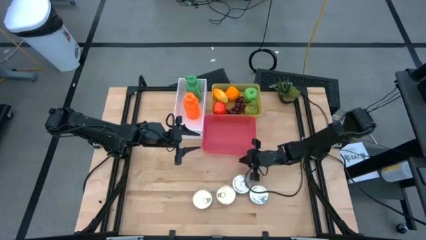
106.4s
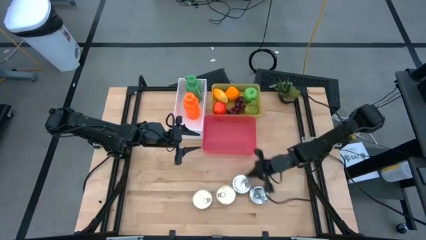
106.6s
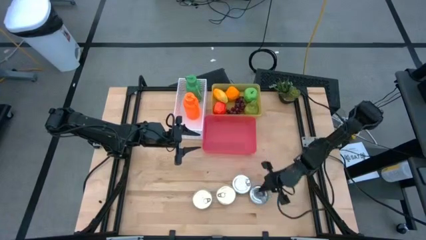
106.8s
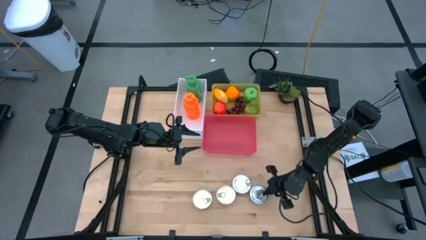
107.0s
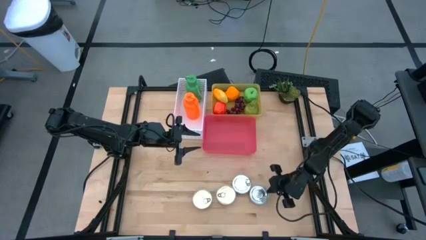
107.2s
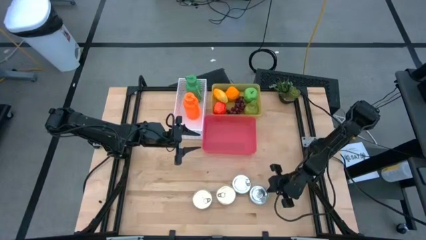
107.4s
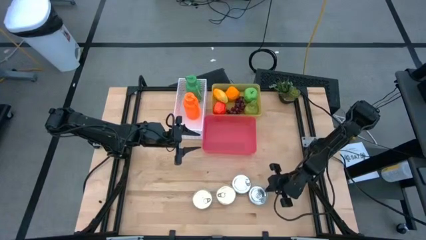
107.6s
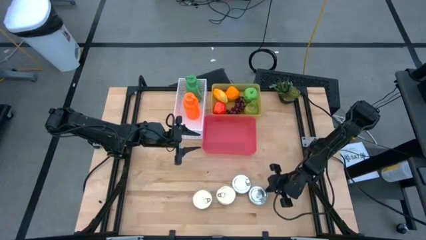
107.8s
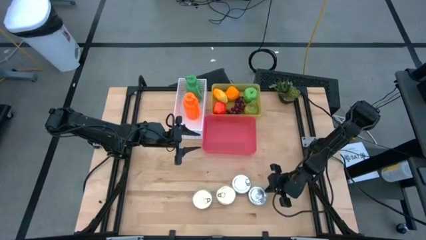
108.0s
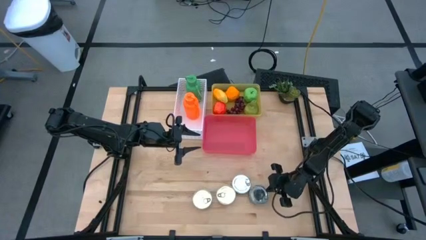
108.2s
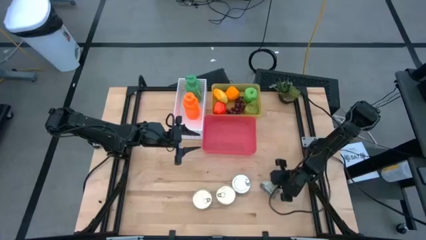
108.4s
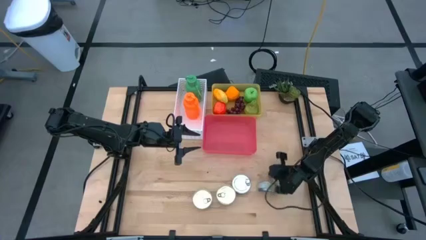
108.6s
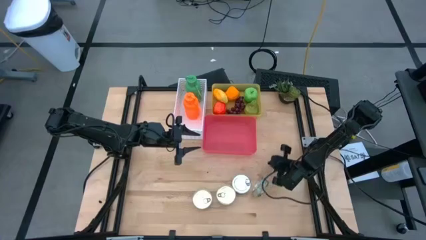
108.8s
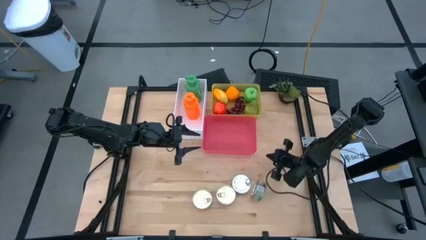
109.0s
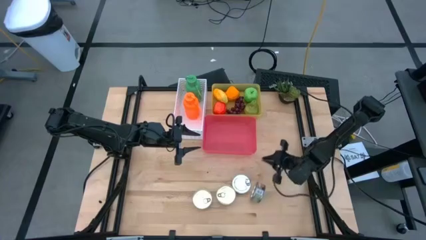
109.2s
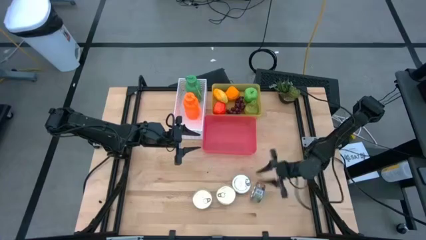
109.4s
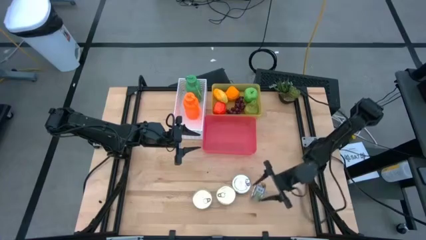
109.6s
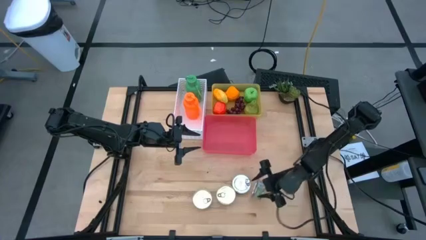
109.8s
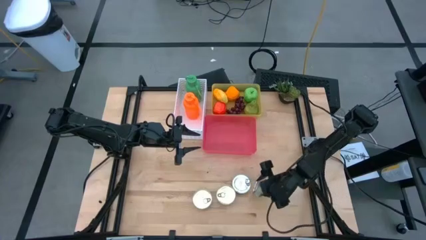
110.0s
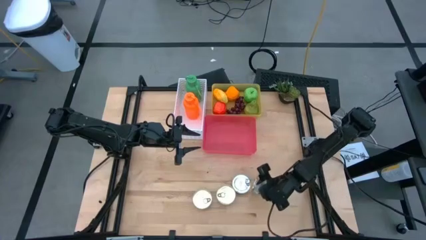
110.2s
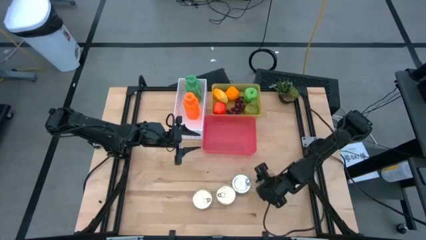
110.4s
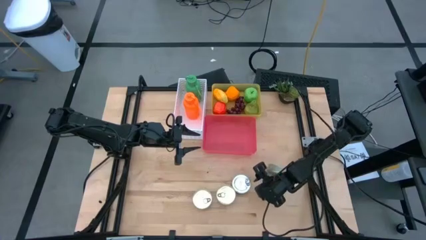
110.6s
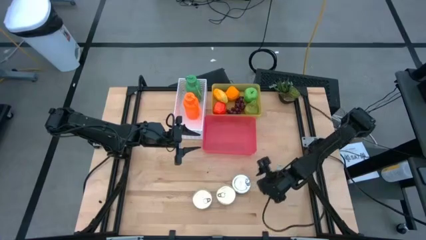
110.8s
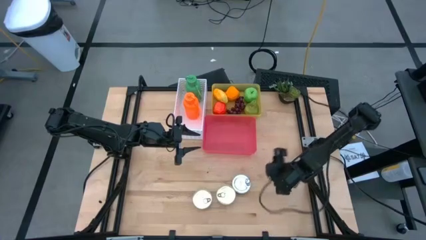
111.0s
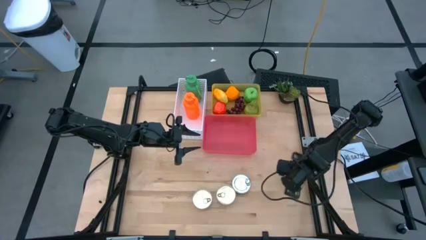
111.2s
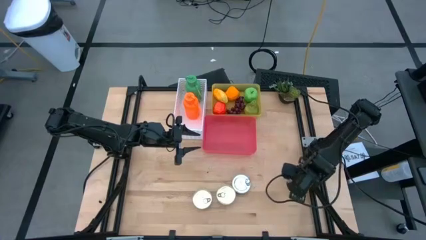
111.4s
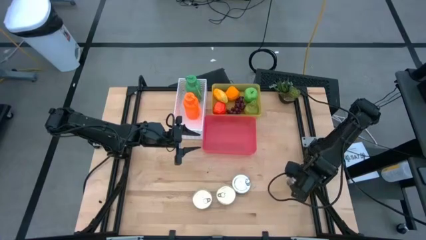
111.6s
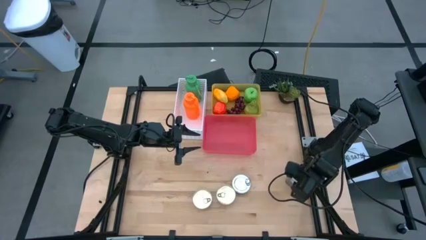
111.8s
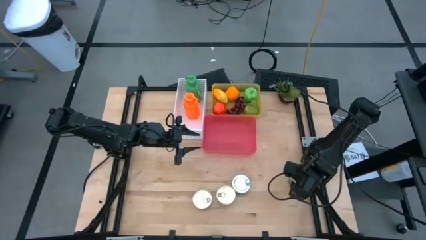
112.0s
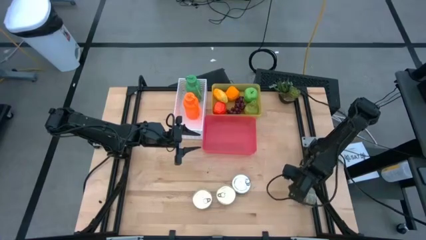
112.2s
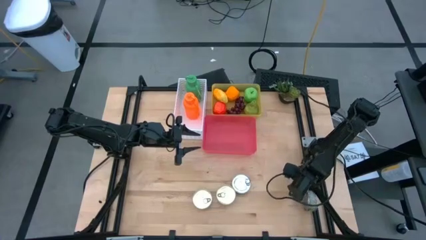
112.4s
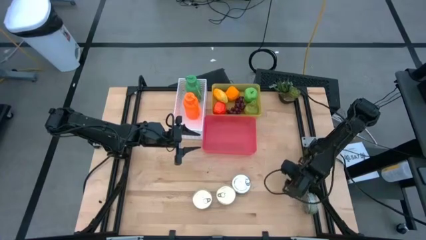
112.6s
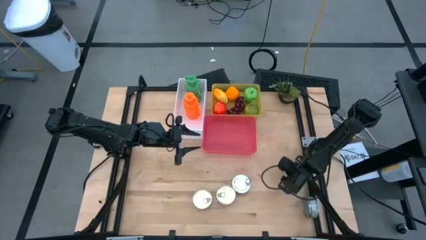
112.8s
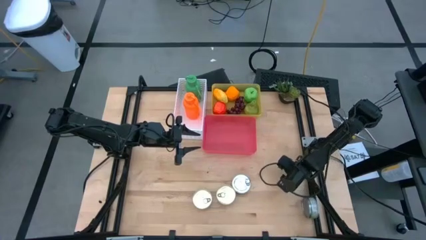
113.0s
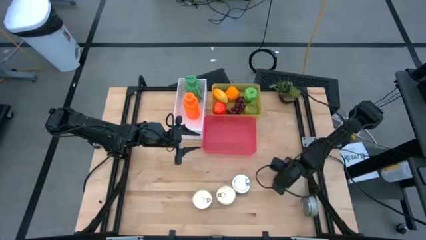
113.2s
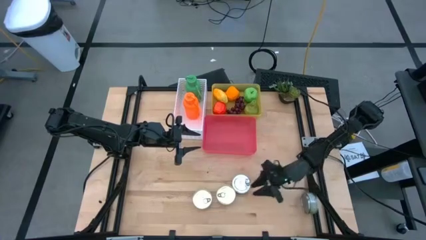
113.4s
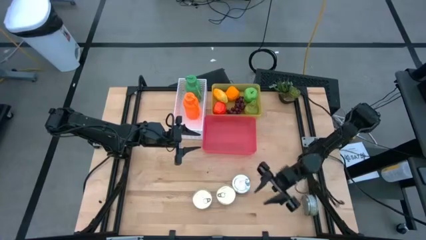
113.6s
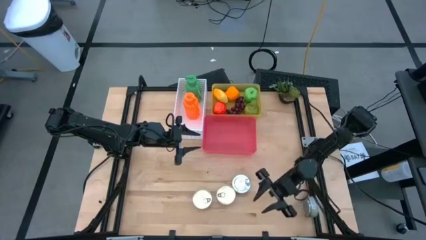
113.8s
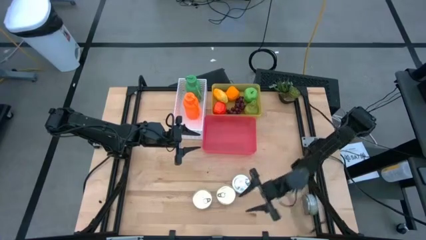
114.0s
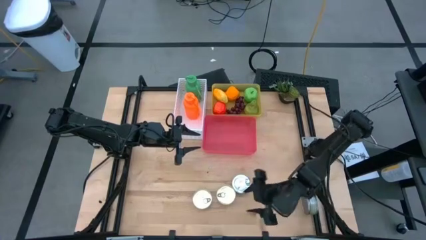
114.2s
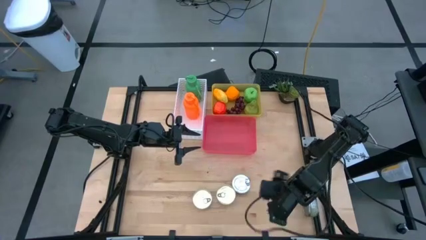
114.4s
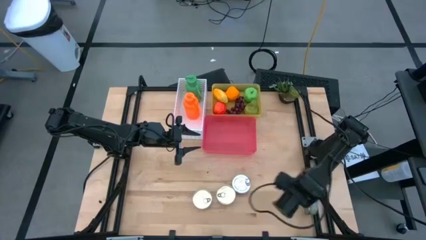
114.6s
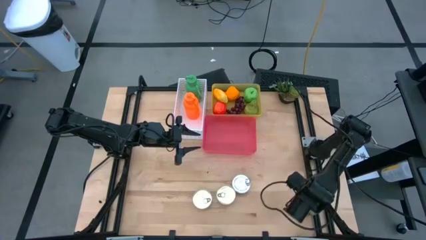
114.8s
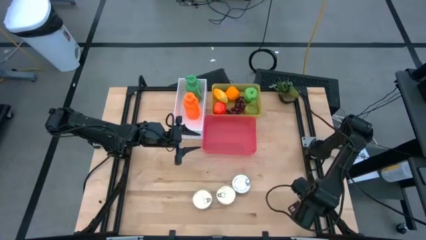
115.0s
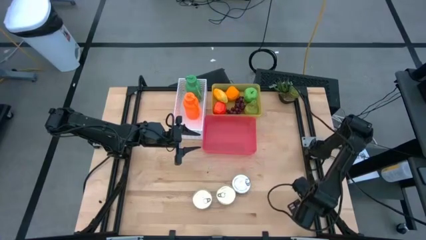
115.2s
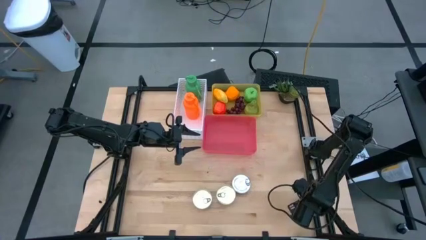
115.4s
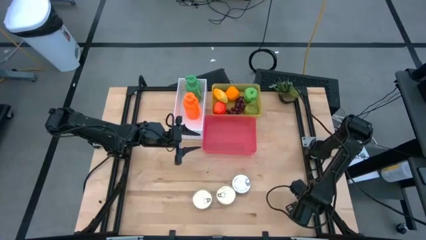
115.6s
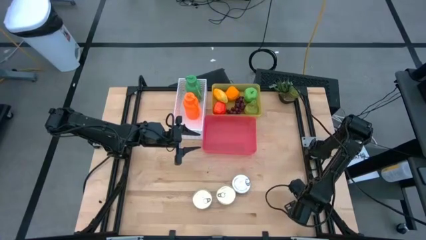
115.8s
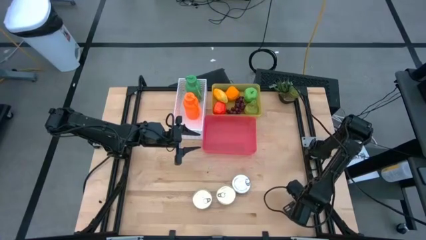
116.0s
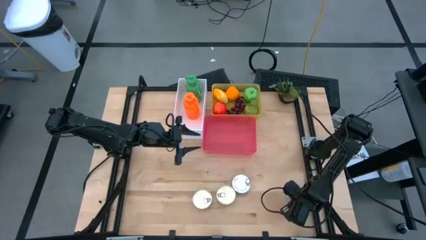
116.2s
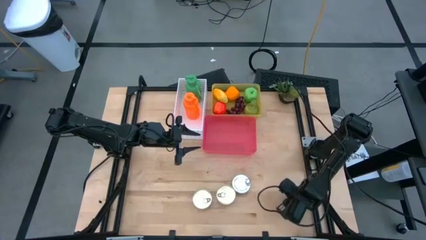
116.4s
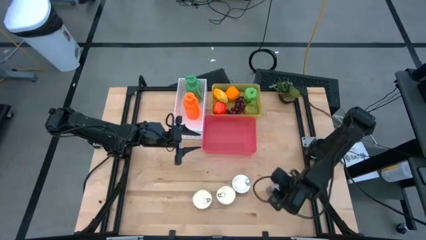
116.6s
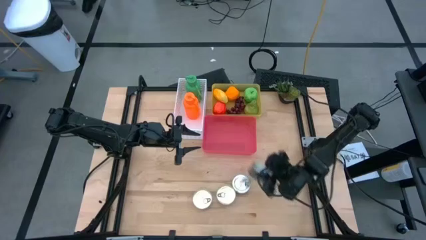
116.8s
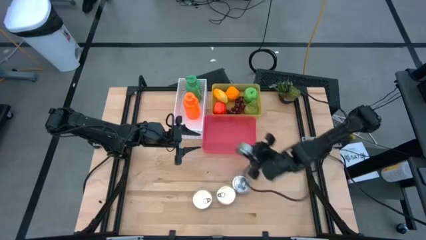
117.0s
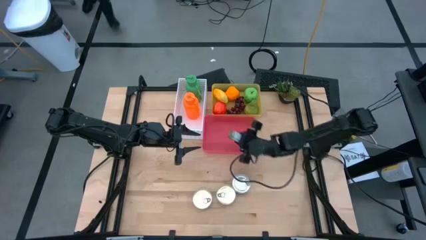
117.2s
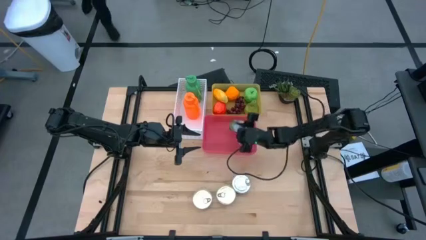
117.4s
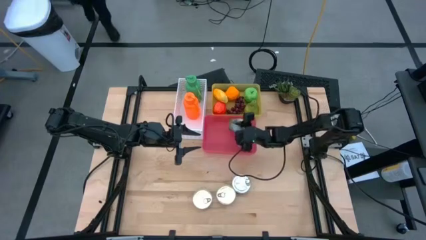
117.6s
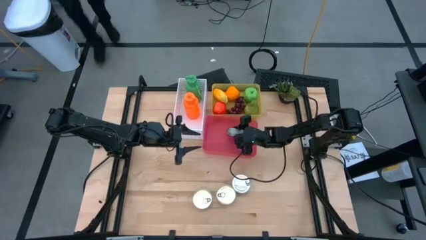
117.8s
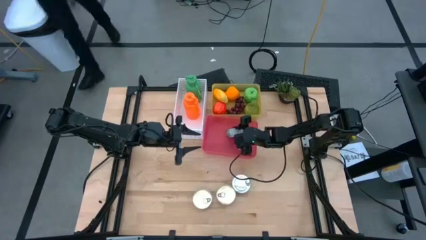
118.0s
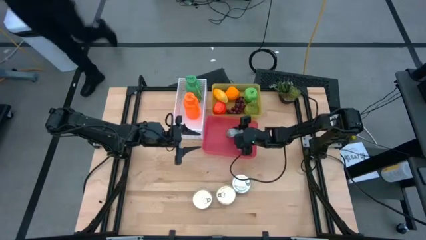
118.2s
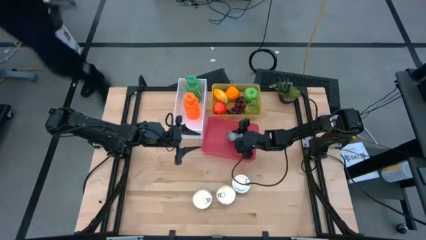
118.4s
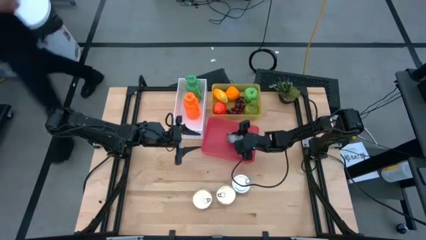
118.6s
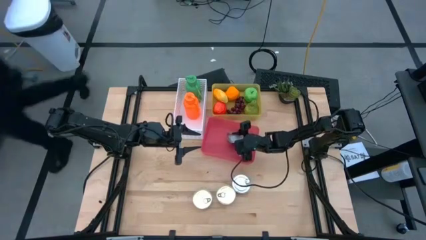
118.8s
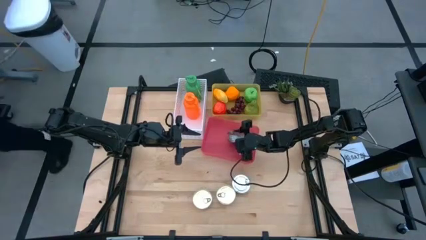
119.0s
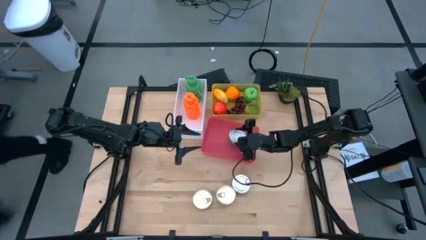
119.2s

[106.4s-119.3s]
Task: Pick & Place Food Item
Put the right green tuna can into the red bin

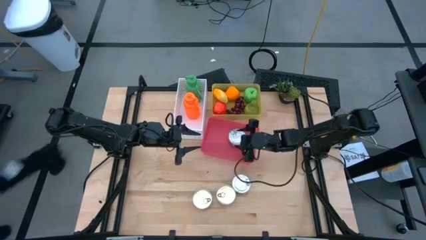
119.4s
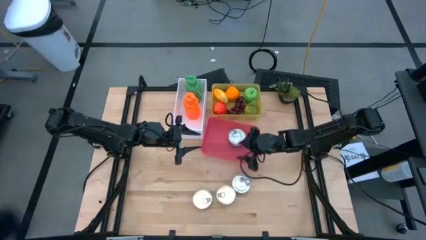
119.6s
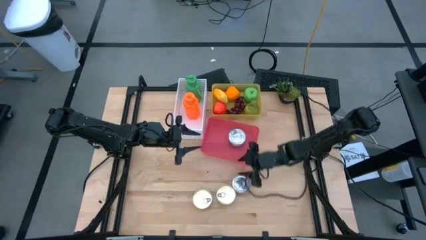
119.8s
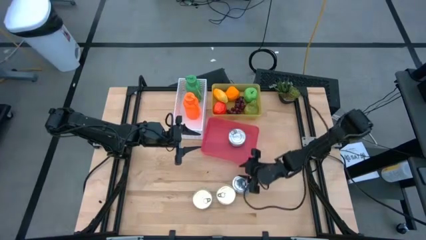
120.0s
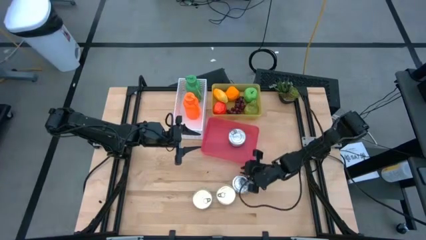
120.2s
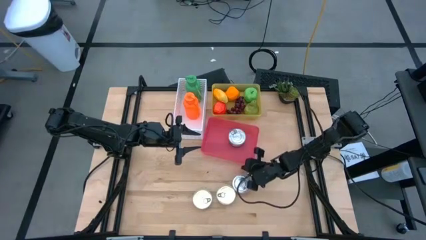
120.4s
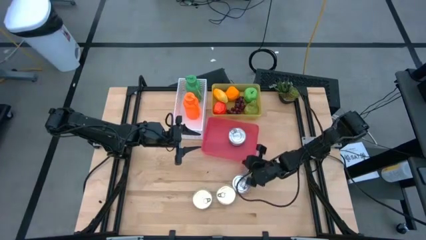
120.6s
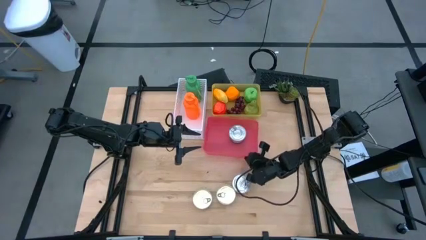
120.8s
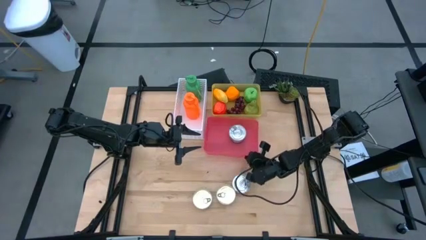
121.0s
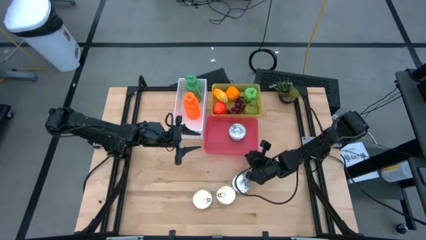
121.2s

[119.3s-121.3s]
Adjust the red bin
